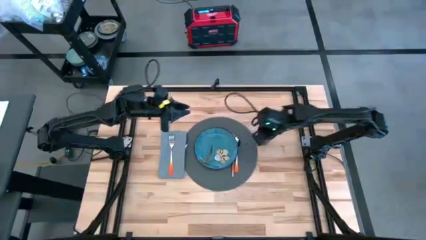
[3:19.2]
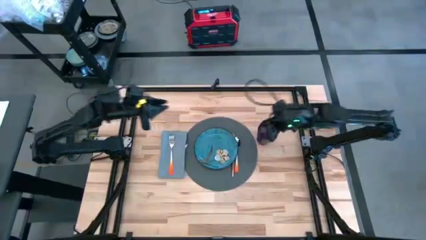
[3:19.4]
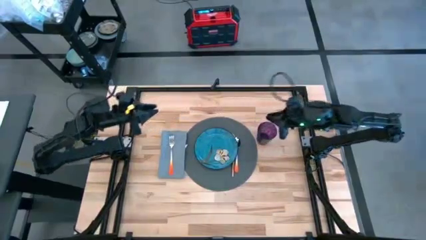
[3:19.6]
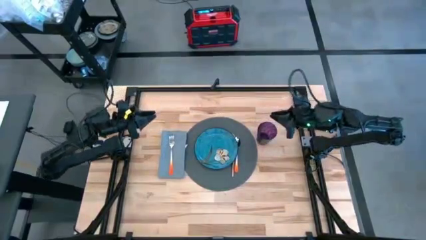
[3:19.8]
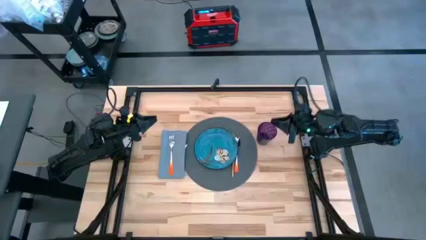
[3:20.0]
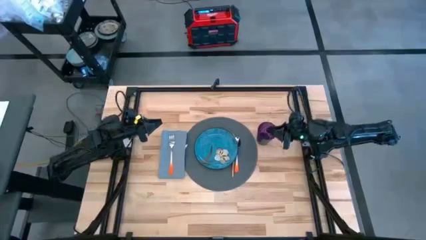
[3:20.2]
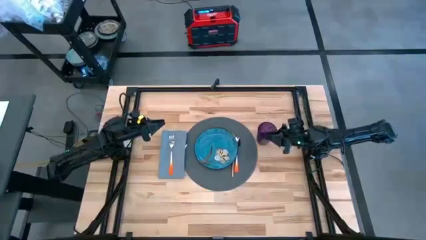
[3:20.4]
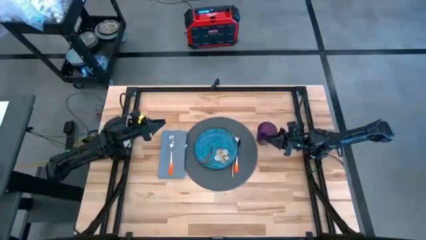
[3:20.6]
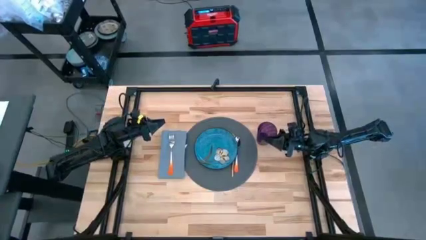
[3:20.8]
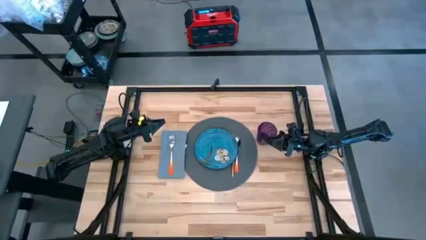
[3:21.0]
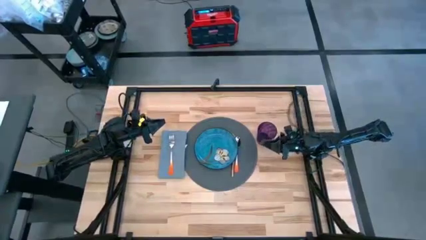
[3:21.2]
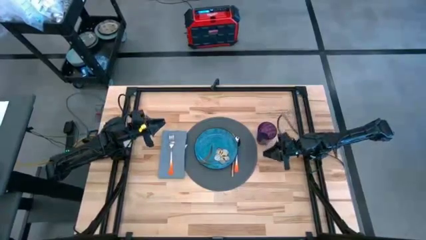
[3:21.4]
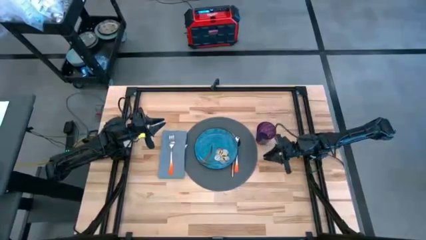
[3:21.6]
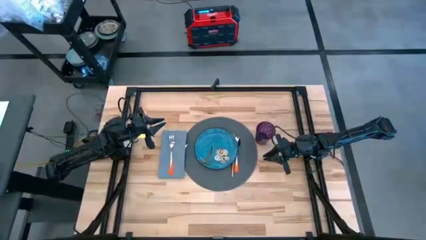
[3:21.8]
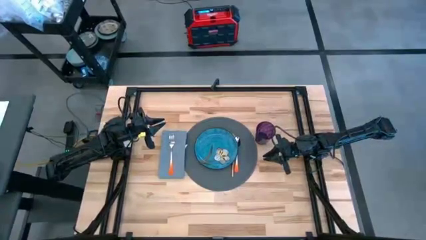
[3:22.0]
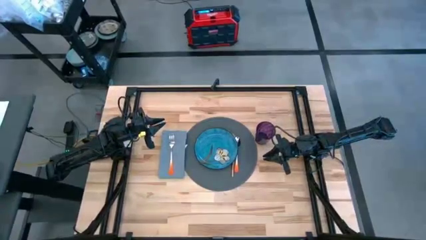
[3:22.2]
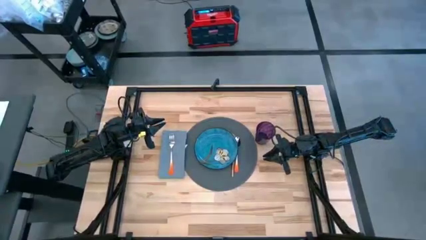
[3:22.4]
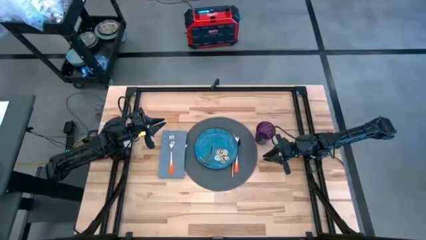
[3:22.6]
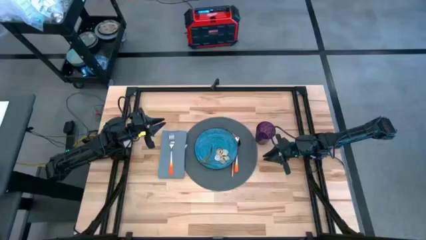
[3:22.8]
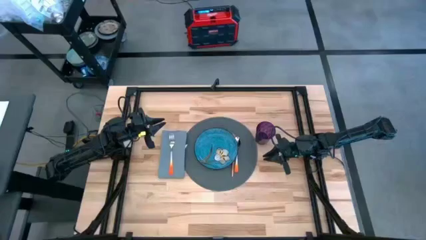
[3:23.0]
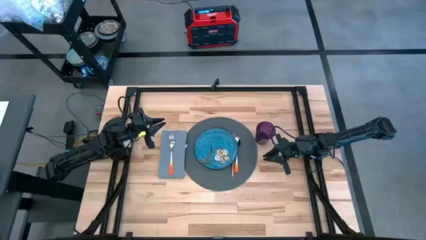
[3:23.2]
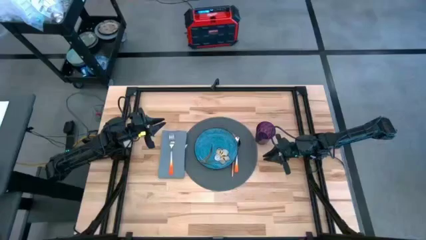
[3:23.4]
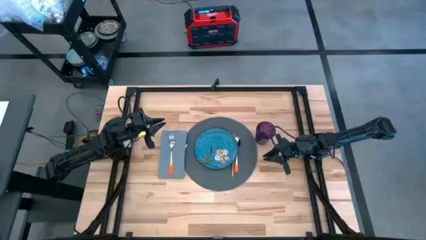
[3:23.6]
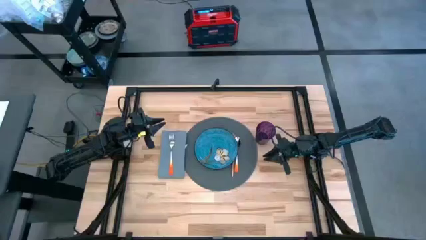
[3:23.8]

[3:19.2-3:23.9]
Task: Set table place
Return to Home Position

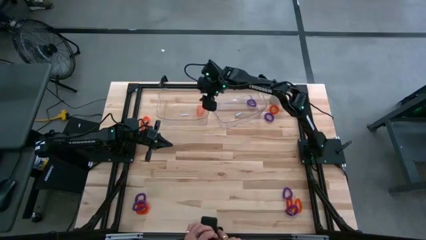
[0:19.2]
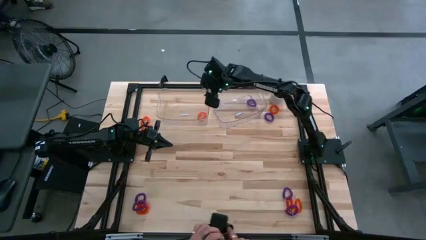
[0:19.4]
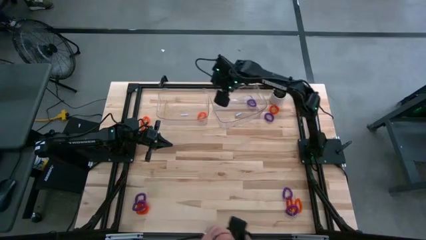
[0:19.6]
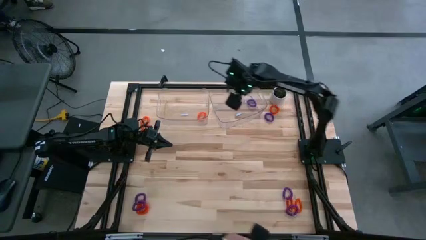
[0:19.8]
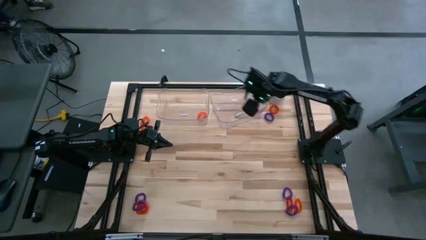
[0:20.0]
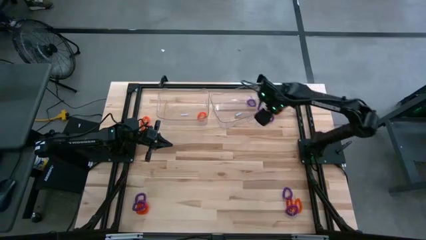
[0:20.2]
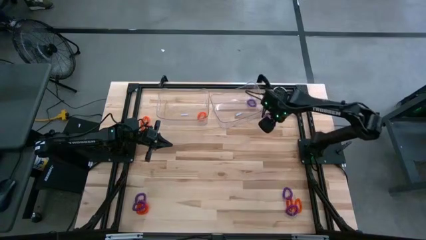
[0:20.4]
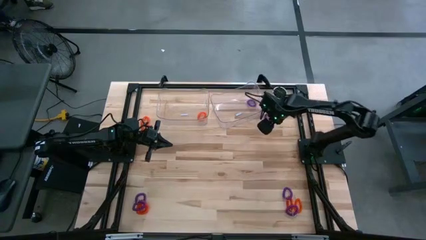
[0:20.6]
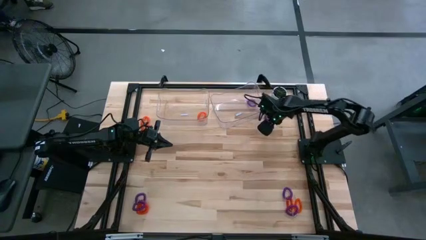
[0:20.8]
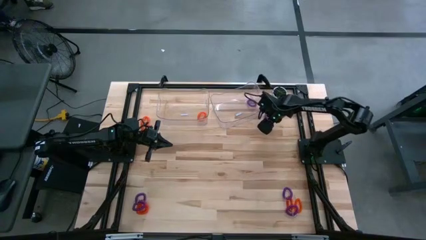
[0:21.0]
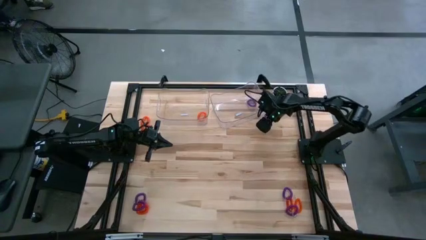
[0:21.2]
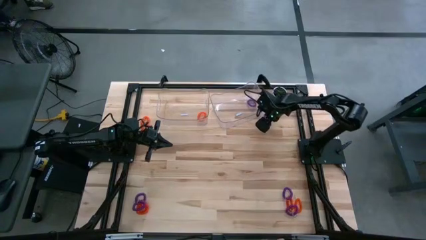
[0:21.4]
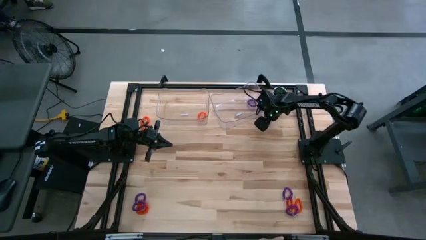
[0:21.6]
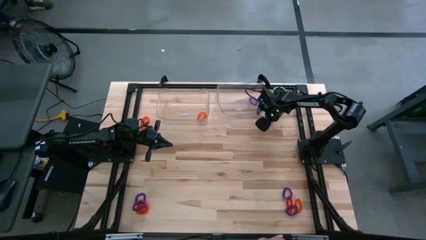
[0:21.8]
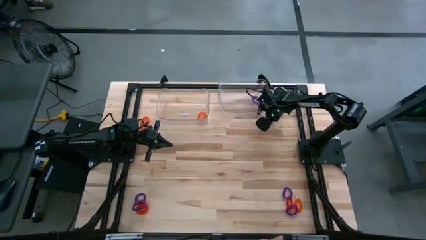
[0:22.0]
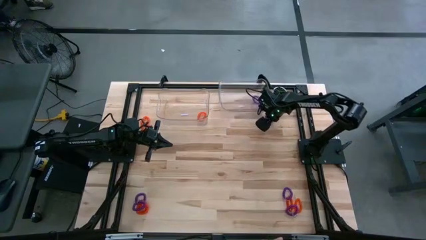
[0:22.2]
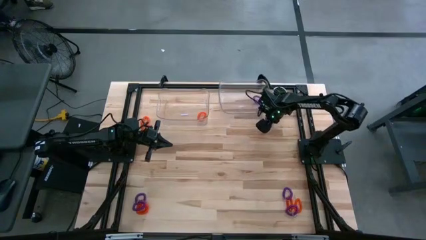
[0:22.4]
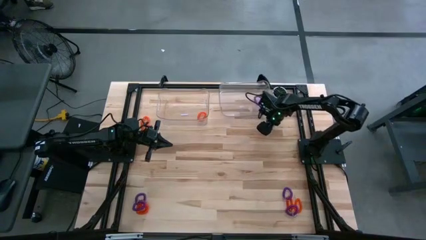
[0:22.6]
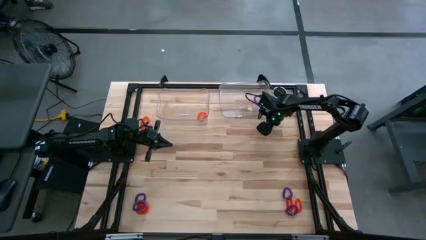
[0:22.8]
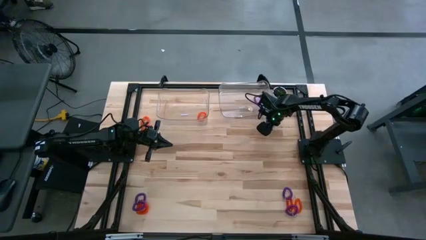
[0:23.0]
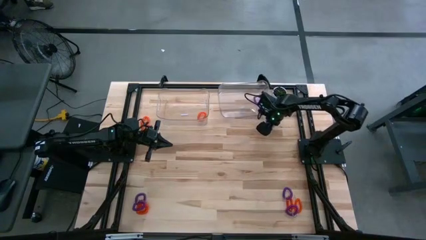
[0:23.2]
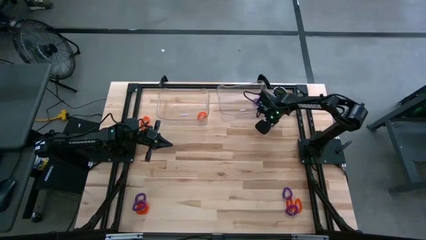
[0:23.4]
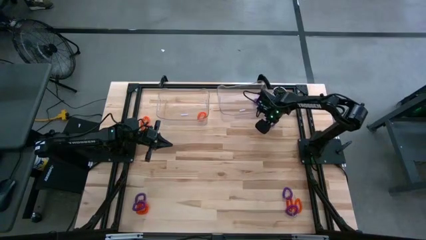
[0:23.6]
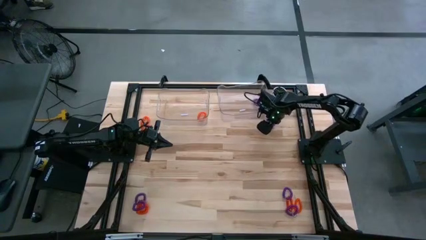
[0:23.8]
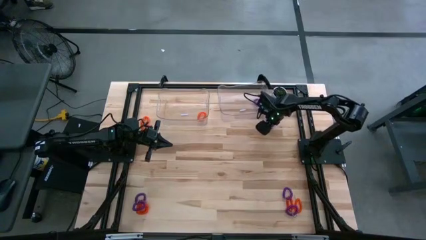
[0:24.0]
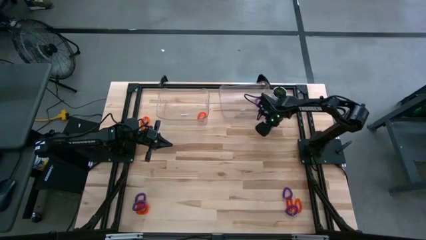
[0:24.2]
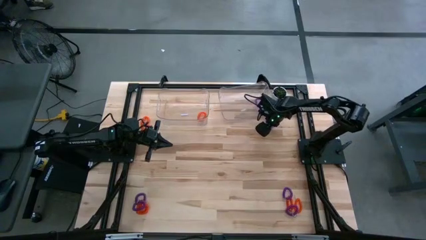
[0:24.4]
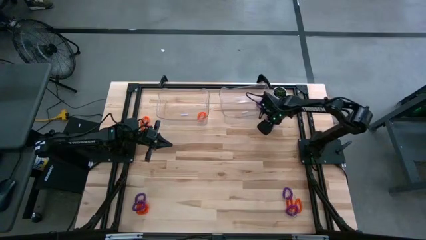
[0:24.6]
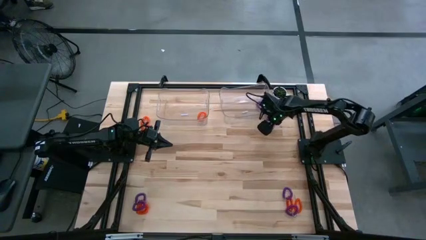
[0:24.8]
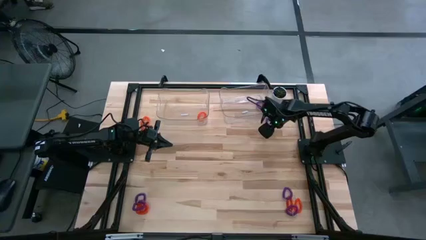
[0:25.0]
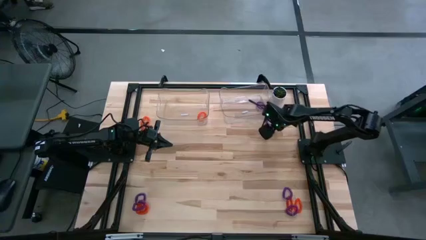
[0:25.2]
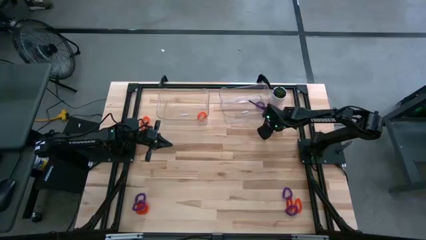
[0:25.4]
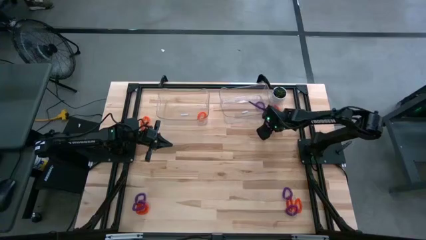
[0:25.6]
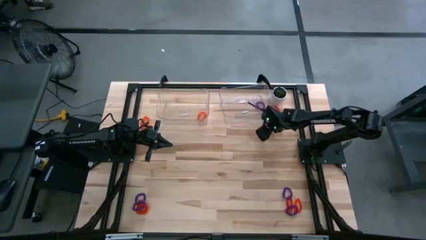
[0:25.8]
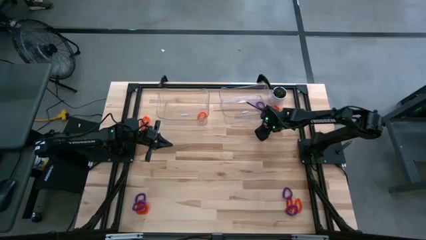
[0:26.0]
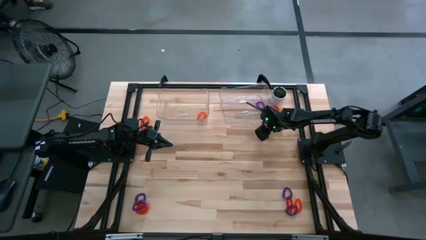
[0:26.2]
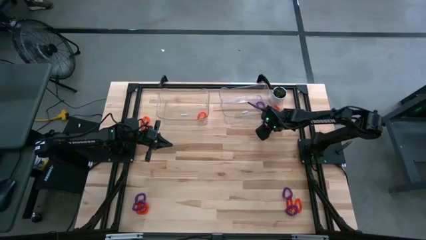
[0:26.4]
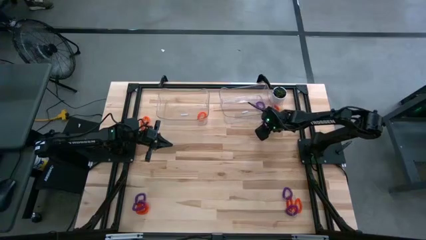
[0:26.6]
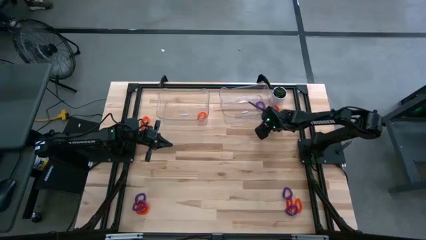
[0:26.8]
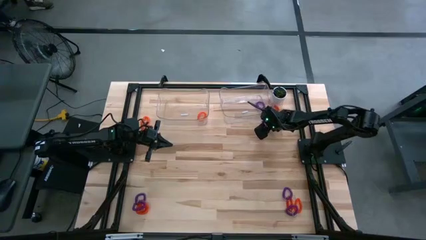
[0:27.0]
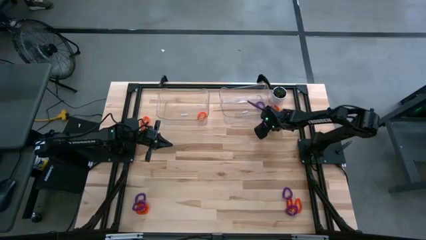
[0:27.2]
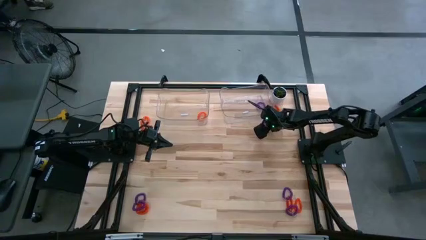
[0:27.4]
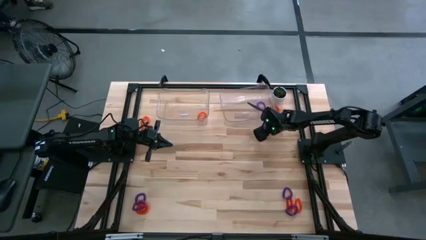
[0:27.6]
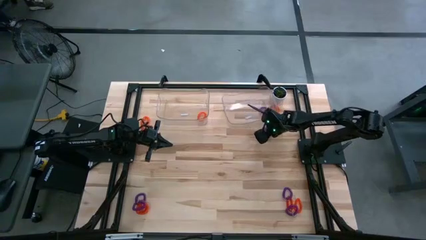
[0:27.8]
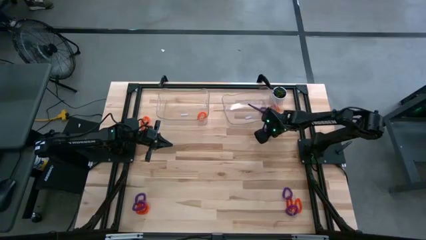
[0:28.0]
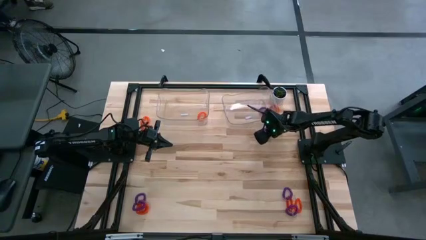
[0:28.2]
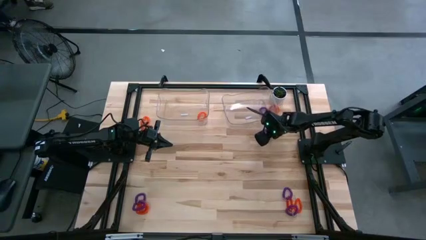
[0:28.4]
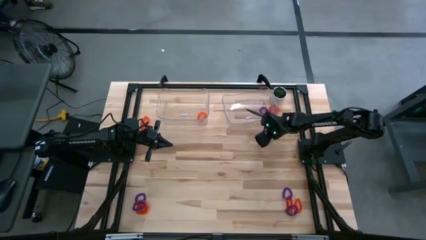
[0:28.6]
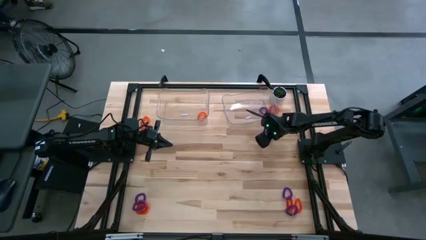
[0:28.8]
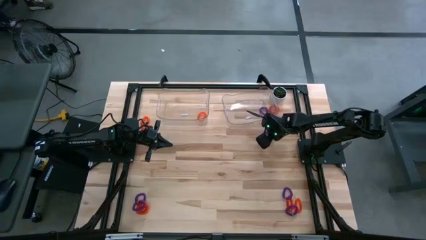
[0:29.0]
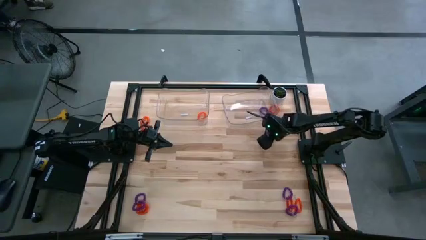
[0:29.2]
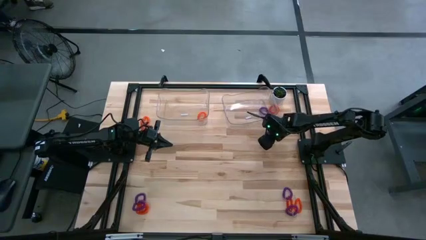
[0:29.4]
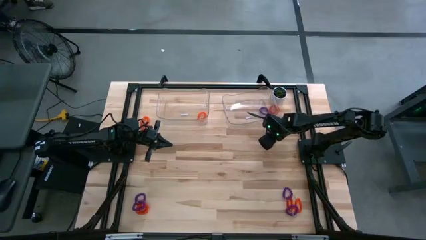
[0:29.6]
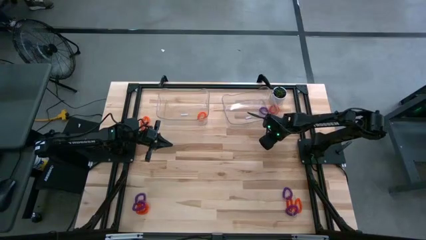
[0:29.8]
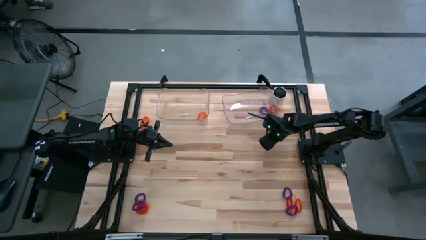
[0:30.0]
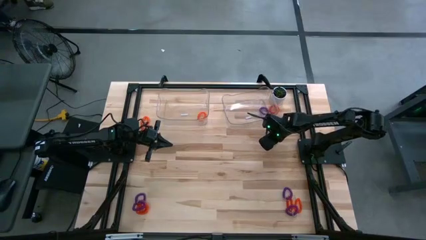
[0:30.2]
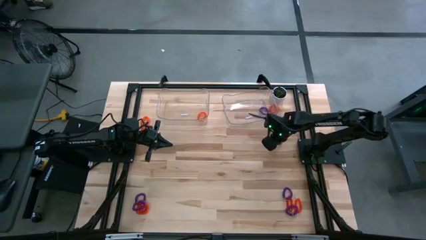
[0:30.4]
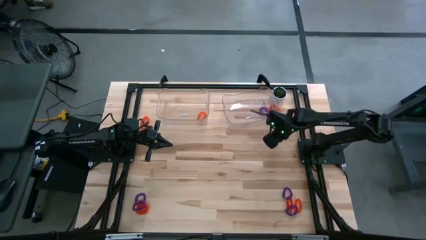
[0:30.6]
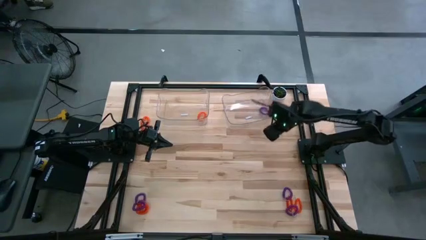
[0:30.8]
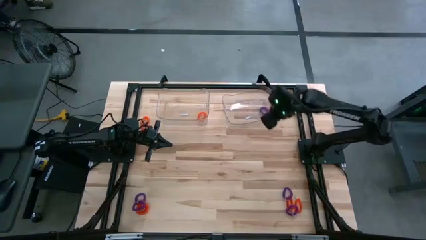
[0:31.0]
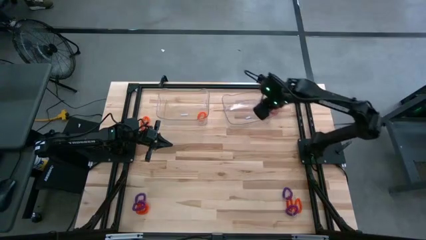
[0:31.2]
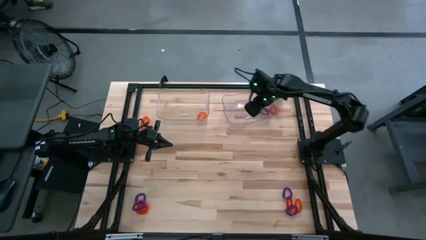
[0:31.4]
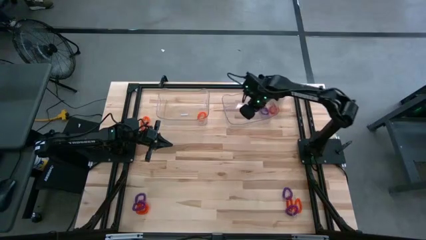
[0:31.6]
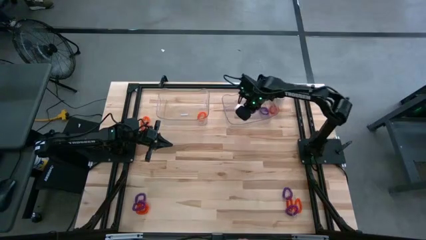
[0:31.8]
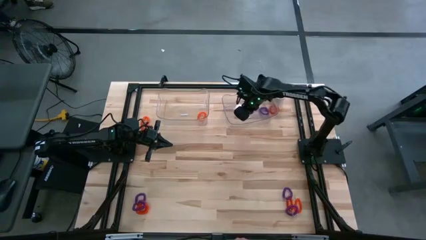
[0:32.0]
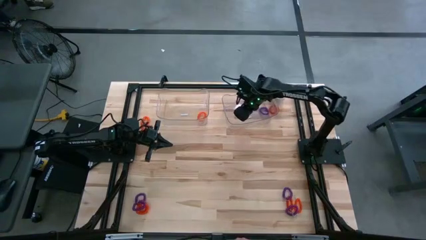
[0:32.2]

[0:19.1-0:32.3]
Task: Sort spring keychains
Put the violet spring keychain into the right transparent bin
